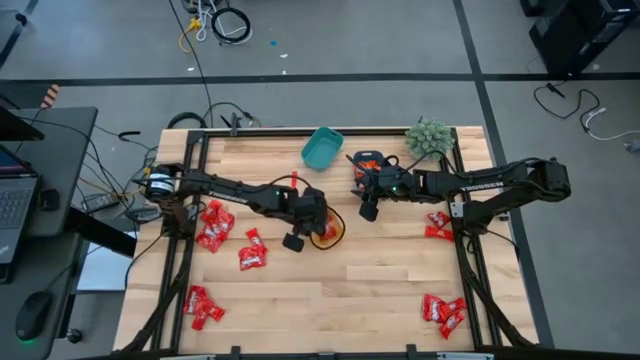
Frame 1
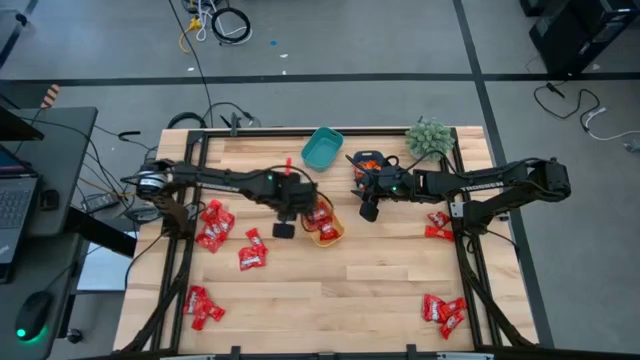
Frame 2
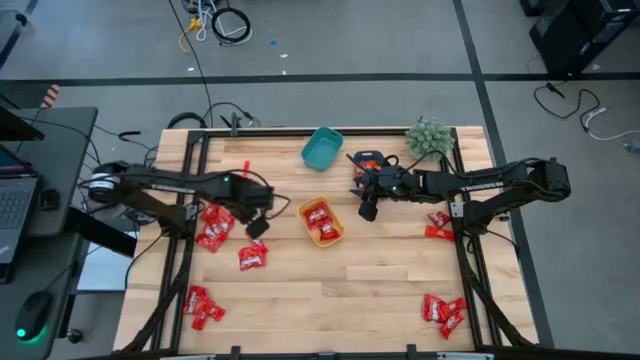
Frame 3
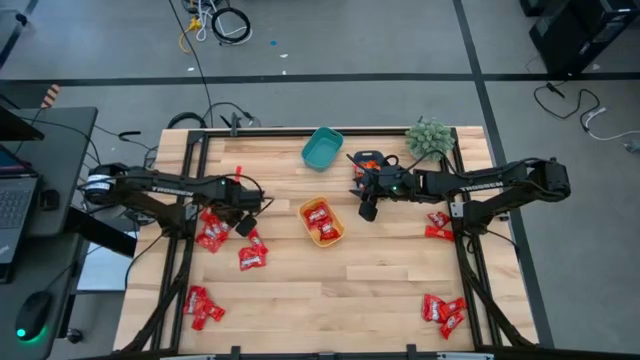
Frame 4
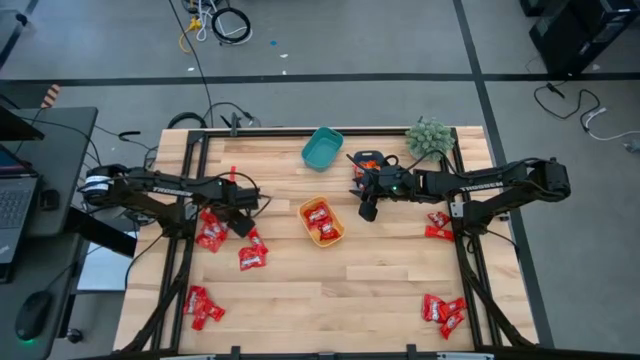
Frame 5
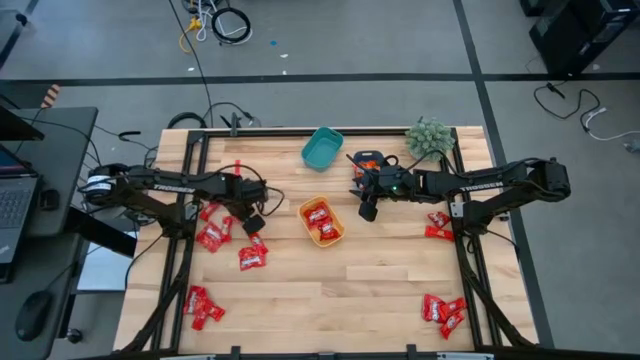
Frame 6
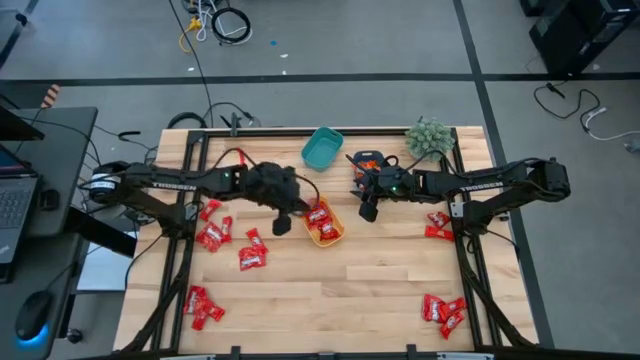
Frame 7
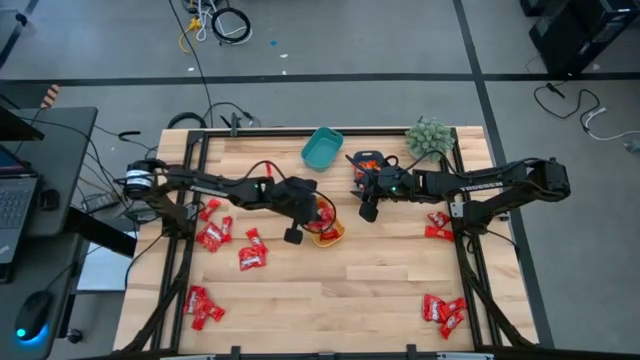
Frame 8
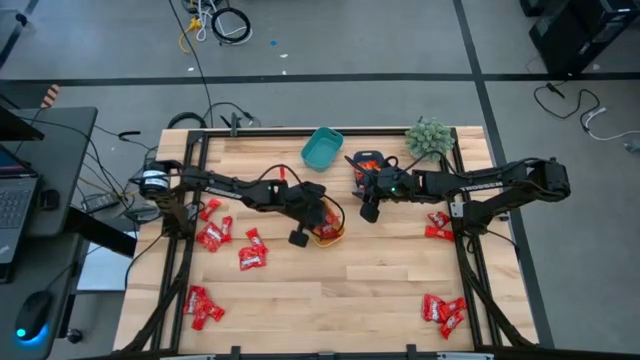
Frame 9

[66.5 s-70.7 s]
Task: Sort candy
Put the red candy into the yellow bin

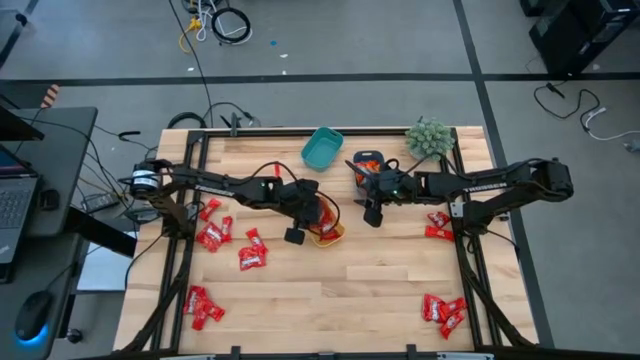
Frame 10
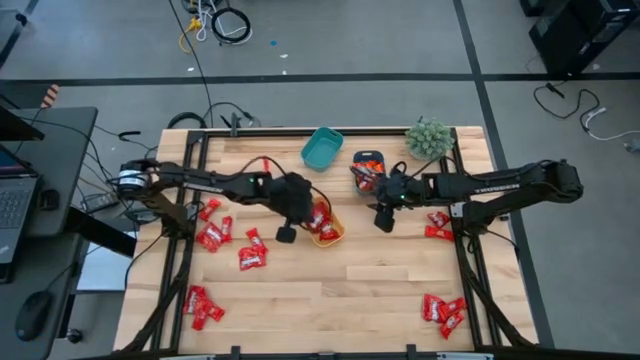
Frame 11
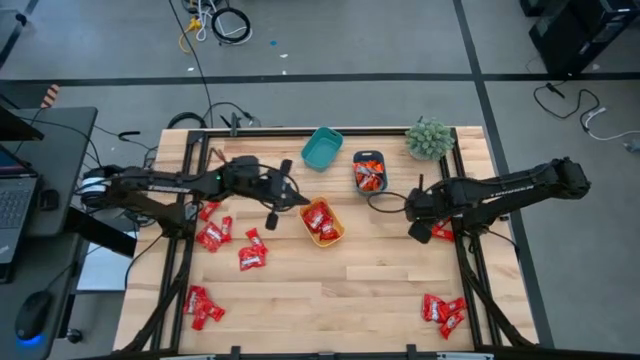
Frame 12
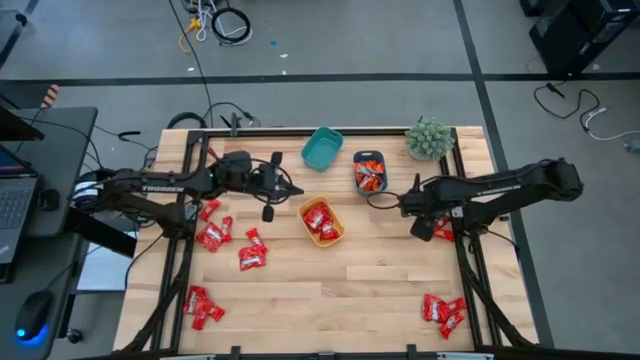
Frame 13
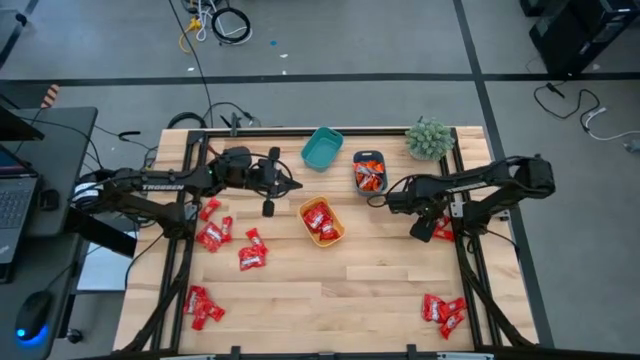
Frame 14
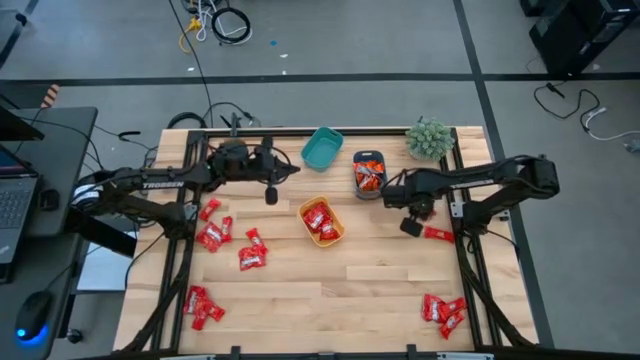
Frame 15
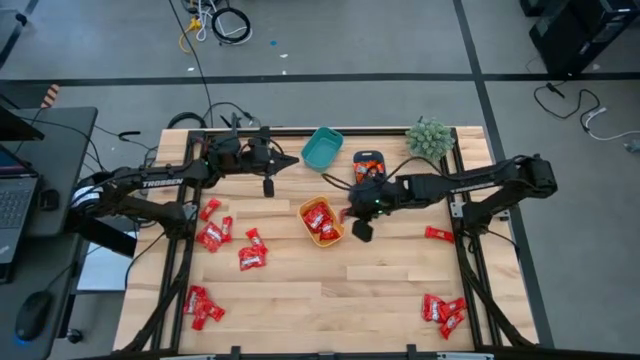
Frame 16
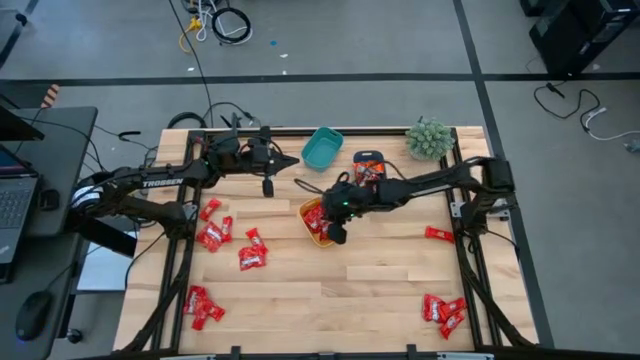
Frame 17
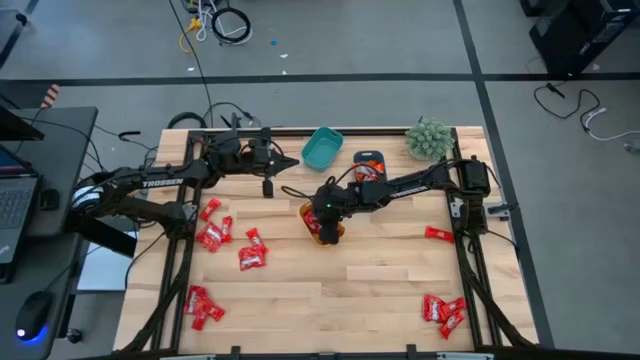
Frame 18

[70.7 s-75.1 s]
Put the red candy into the yellow bin

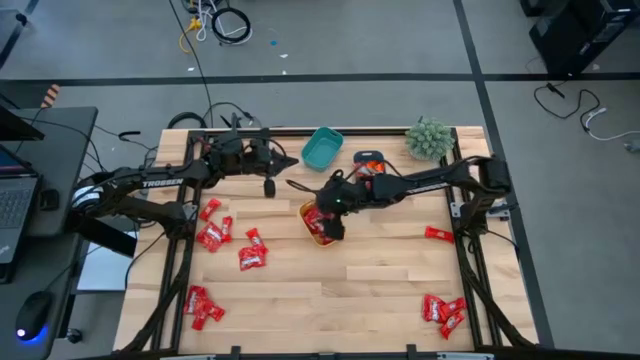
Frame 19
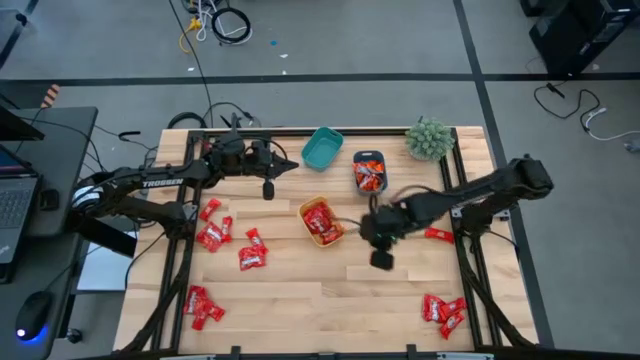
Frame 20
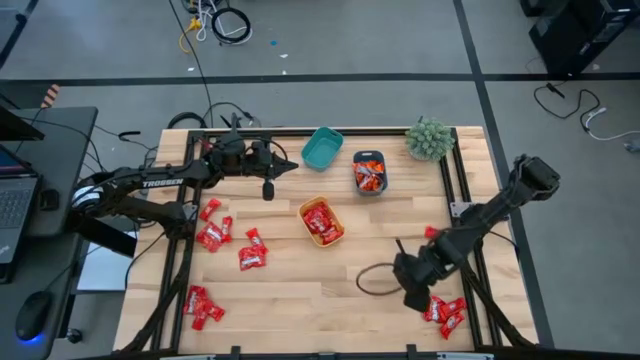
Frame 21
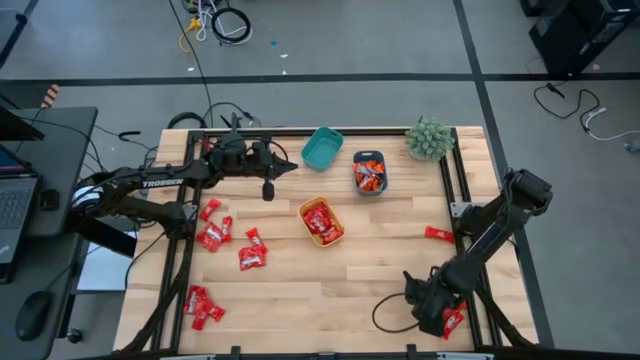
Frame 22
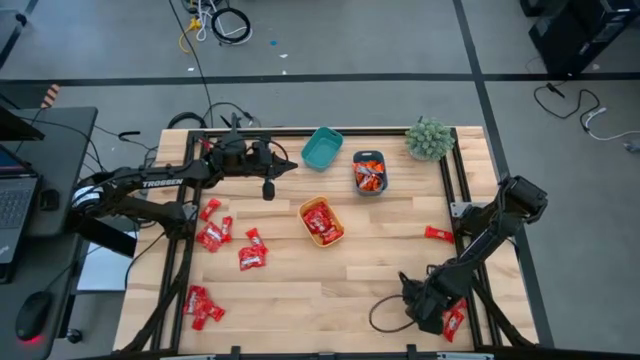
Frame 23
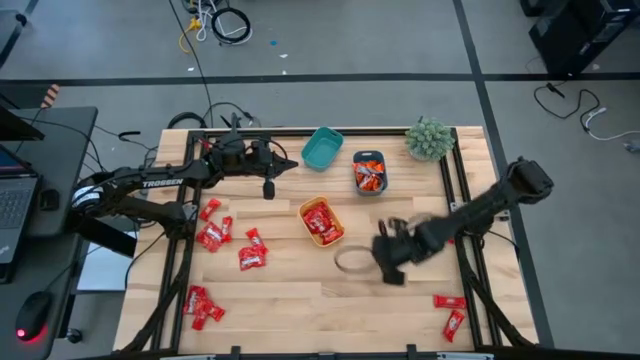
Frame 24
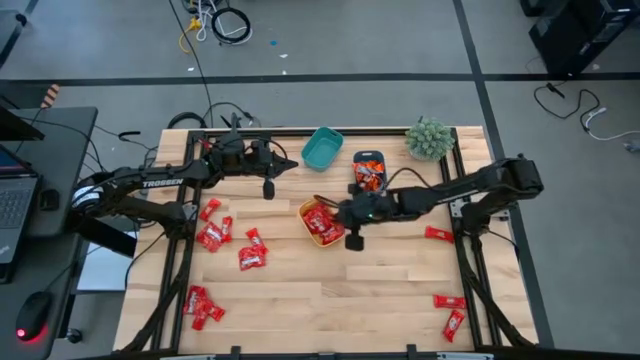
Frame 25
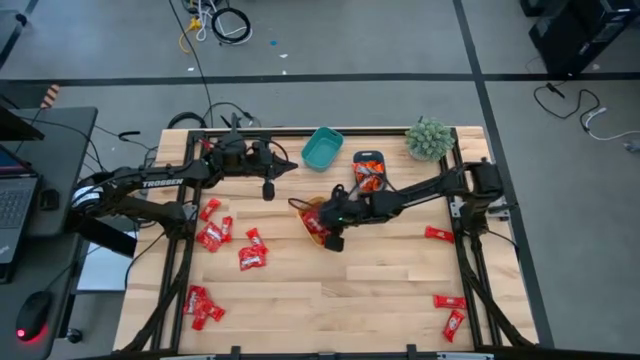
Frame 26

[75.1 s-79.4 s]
Put the red candy into the yellow bin

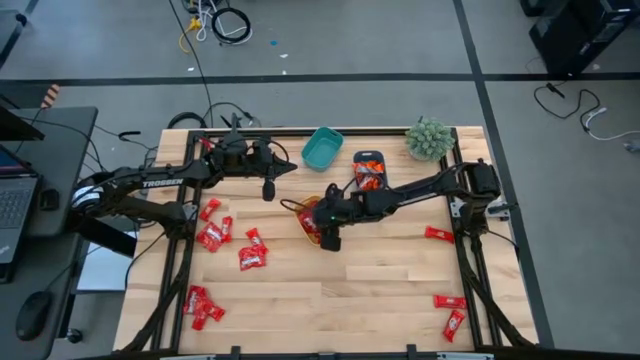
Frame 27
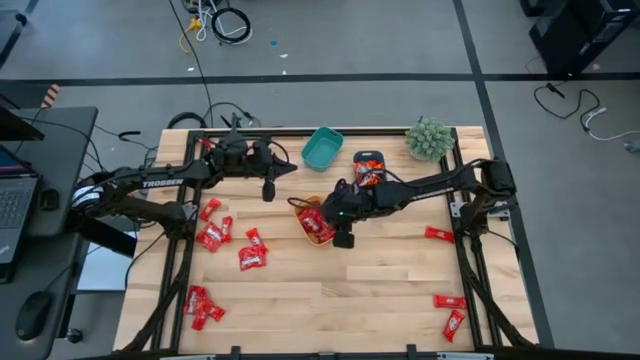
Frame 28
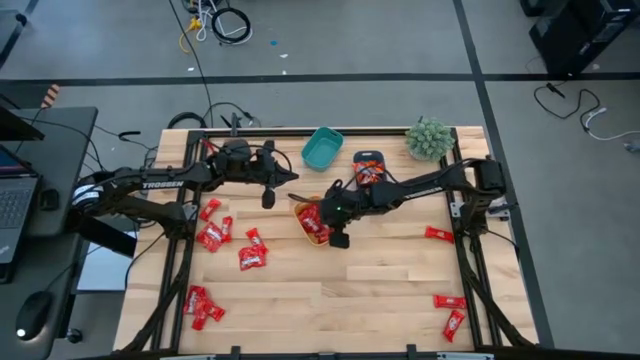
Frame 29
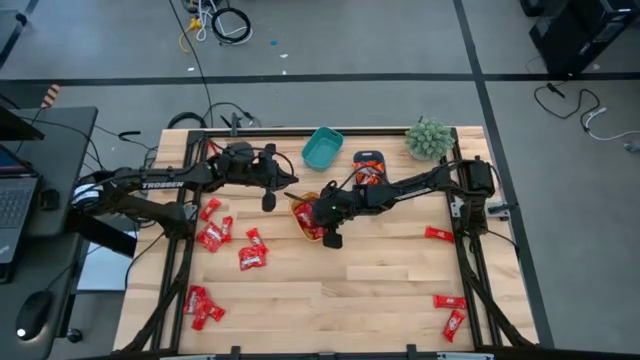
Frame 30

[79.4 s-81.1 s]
Adjust the red candy in the yellow bin

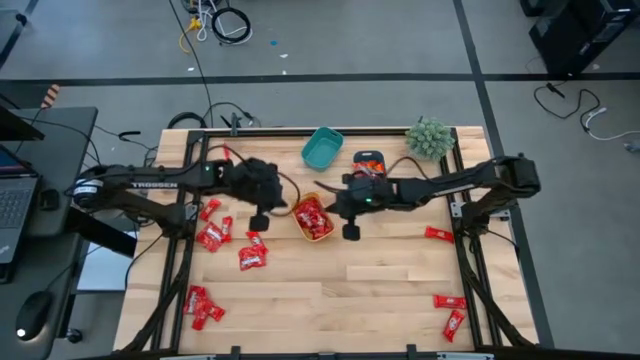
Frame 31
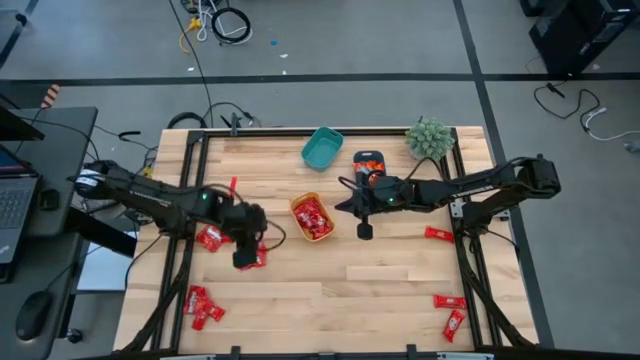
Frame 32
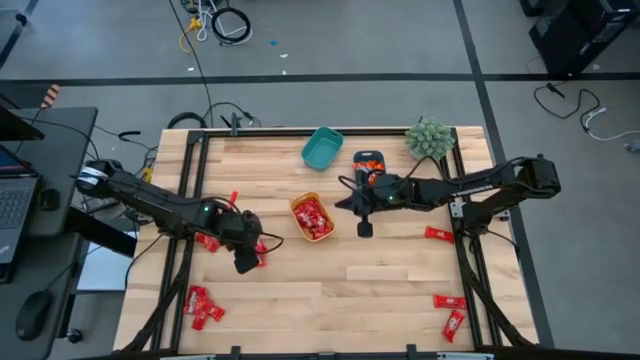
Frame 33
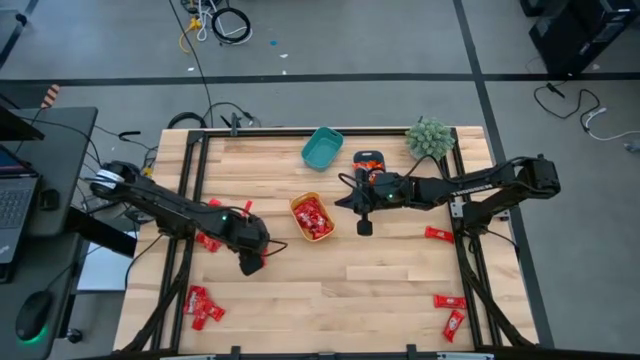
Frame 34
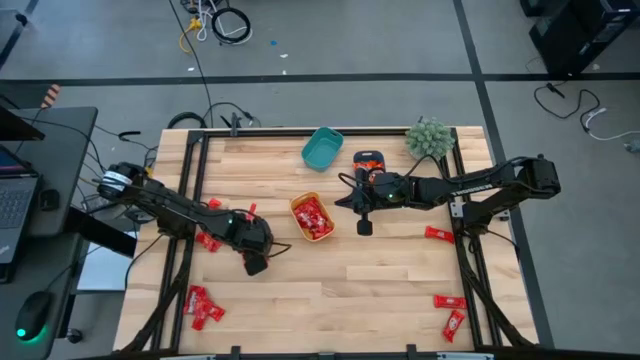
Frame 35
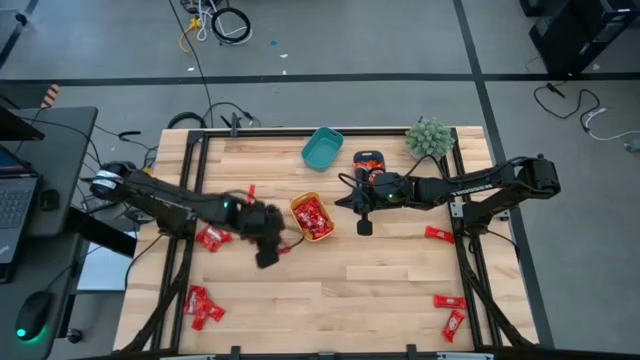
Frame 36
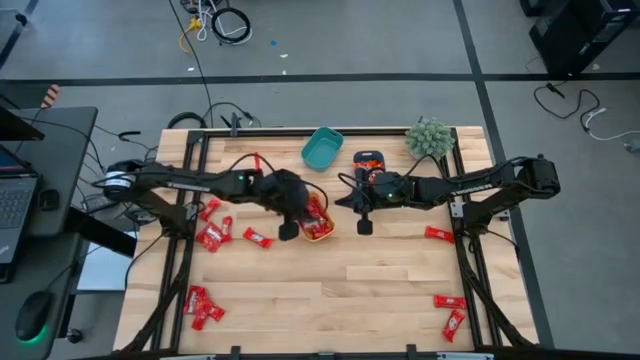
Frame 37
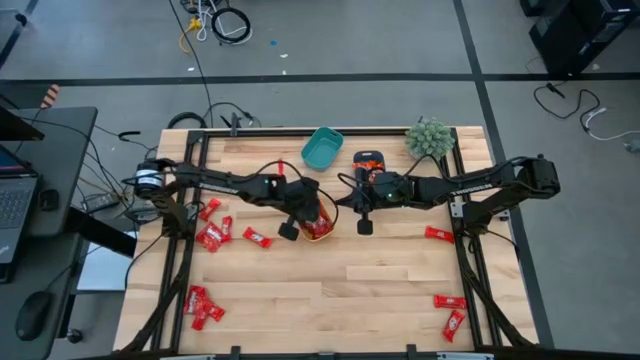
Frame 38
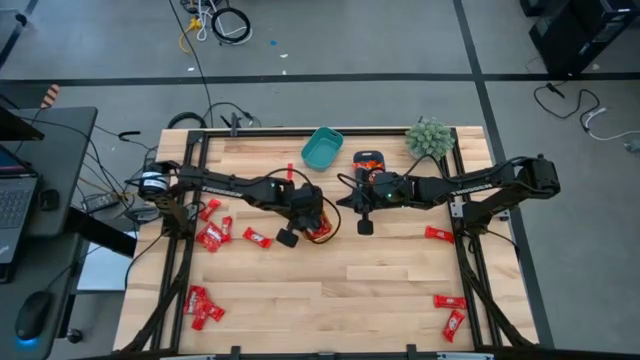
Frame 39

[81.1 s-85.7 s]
Put the red candy into the yellow bin

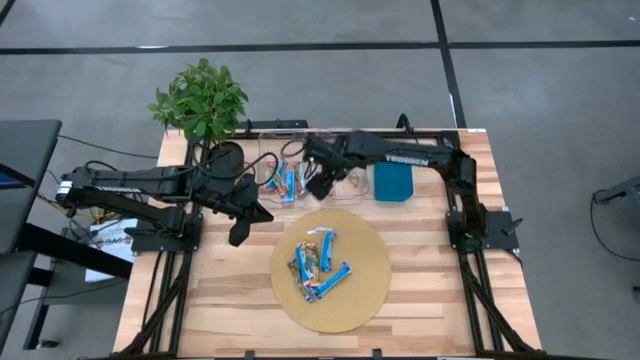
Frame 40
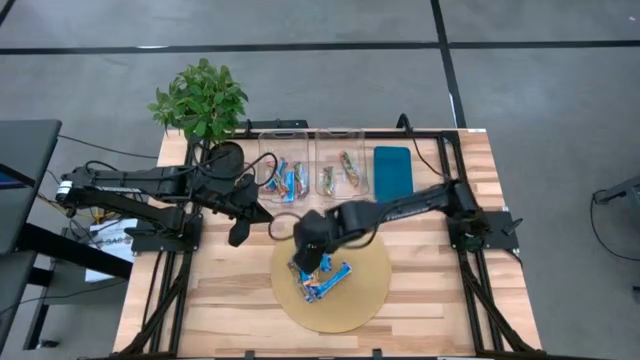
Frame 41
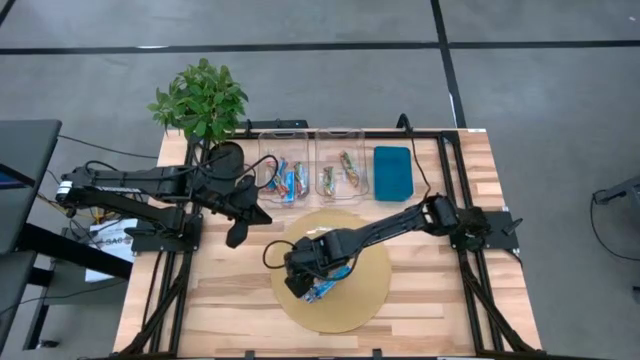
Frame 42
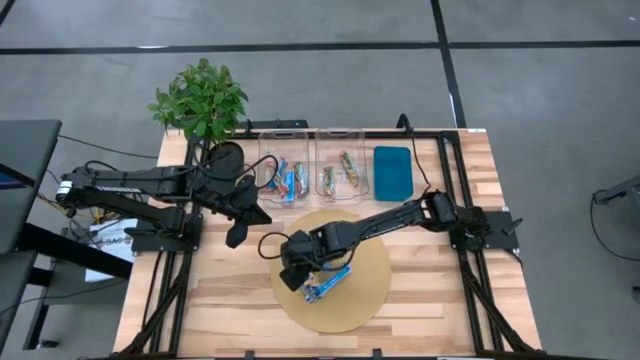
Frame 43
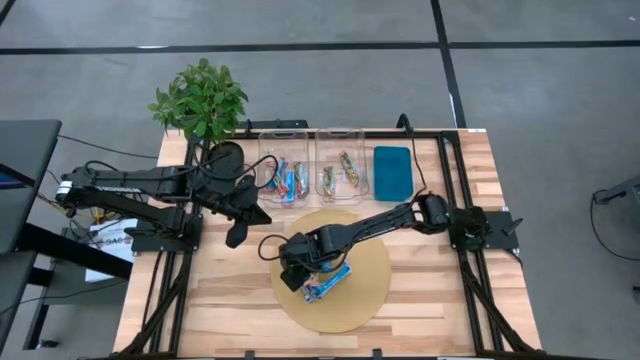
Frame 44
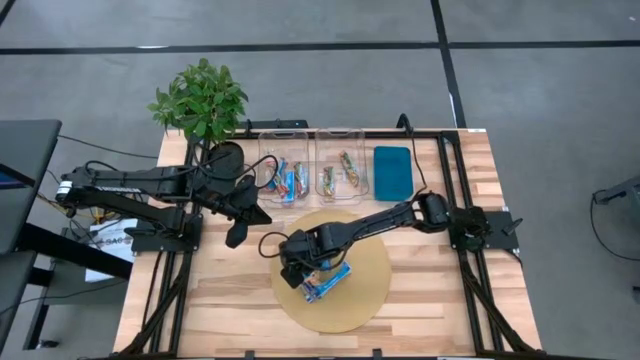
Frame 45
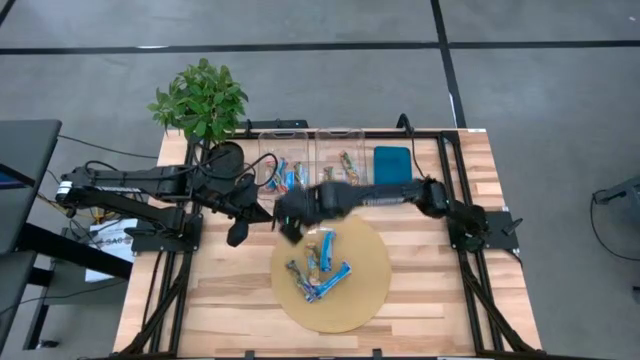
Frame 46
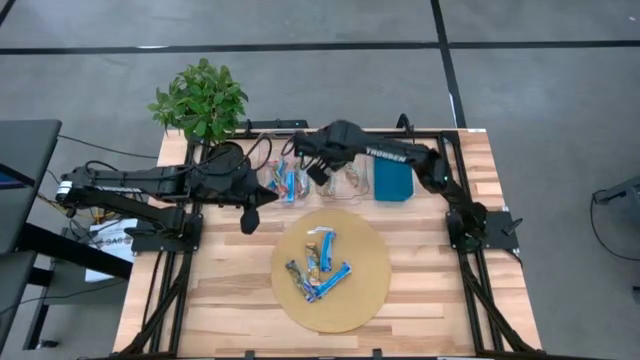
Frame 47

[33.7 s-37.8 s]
Task: Pick and place Granola Bars by type
Put the left yellow granola bar into the right transparent bin
